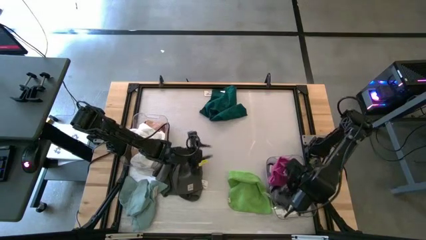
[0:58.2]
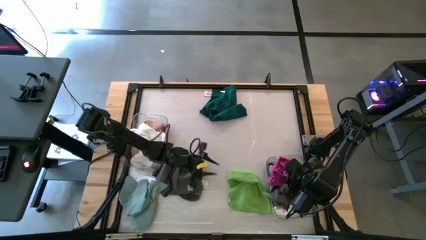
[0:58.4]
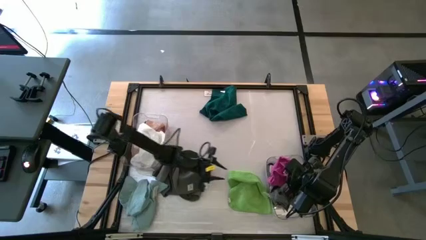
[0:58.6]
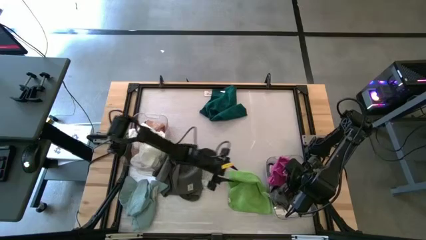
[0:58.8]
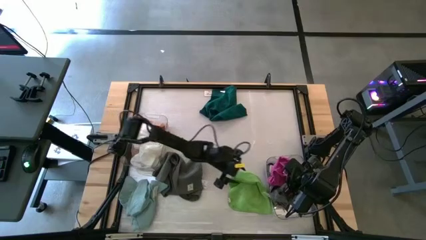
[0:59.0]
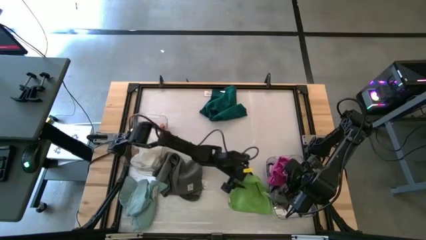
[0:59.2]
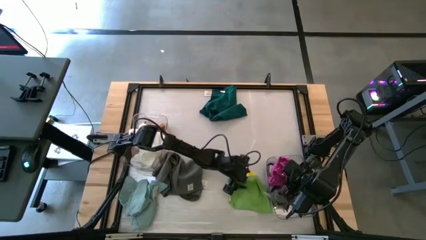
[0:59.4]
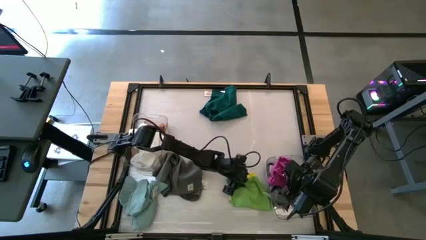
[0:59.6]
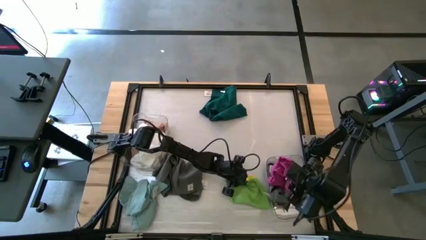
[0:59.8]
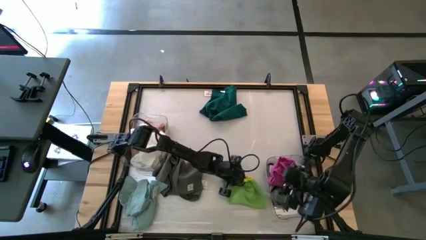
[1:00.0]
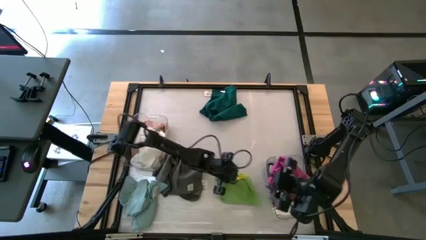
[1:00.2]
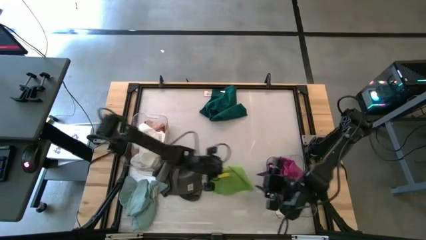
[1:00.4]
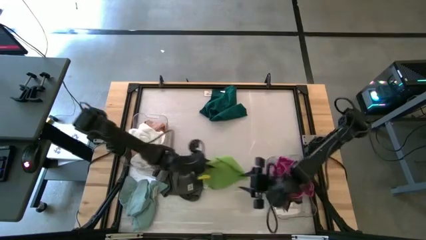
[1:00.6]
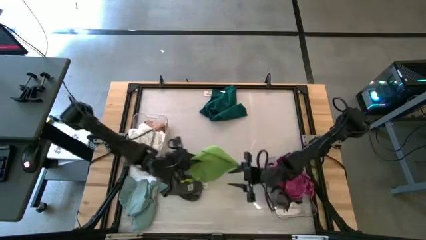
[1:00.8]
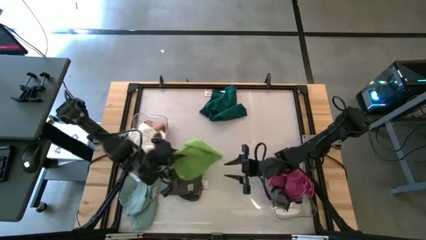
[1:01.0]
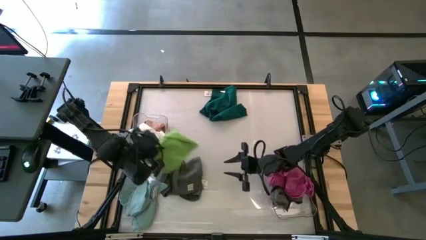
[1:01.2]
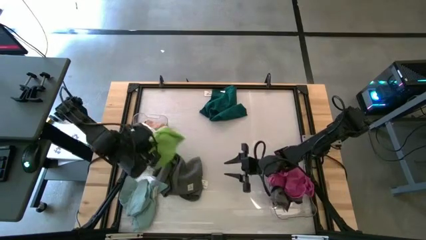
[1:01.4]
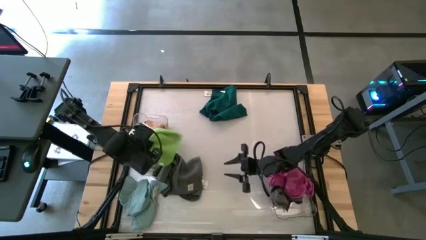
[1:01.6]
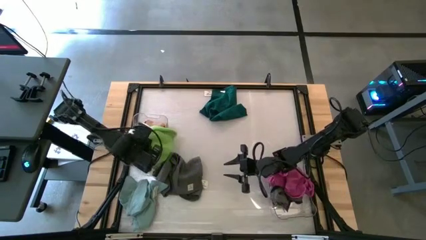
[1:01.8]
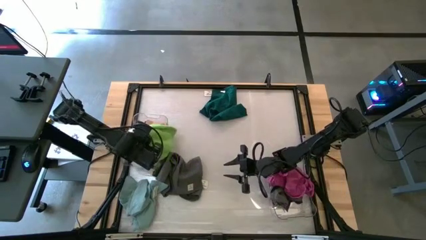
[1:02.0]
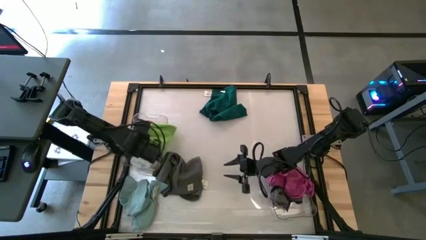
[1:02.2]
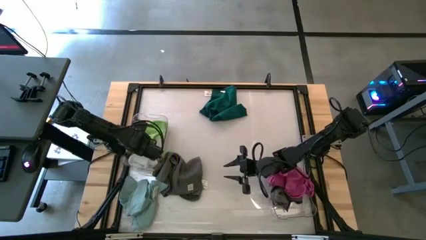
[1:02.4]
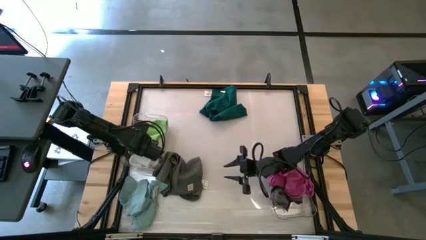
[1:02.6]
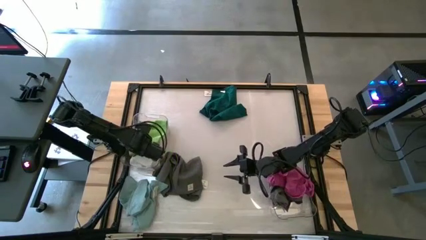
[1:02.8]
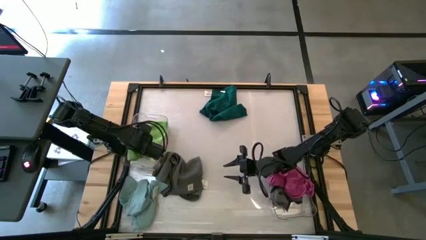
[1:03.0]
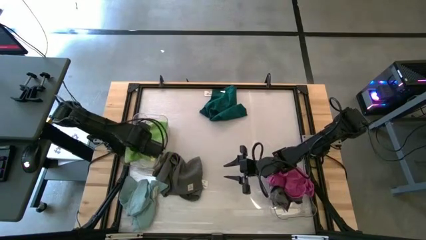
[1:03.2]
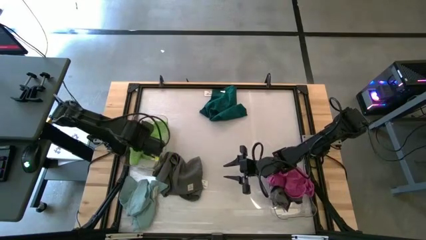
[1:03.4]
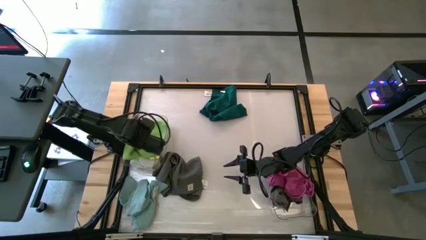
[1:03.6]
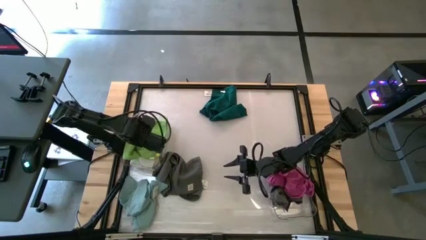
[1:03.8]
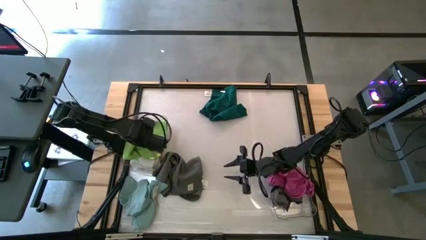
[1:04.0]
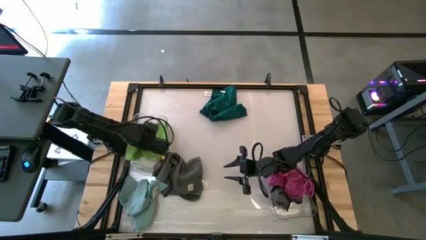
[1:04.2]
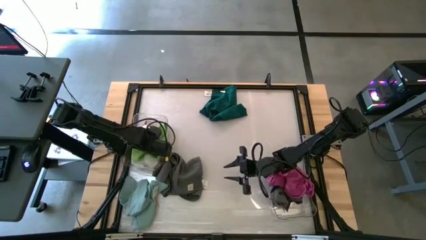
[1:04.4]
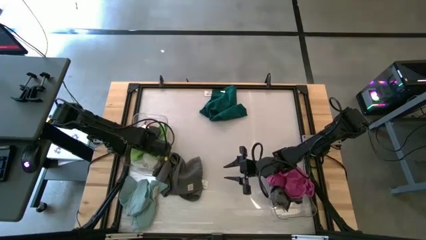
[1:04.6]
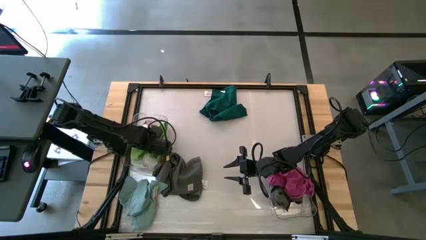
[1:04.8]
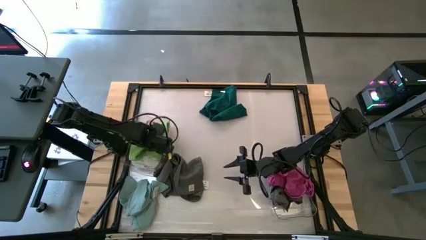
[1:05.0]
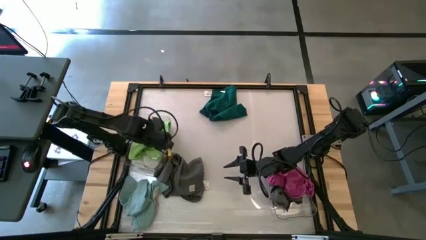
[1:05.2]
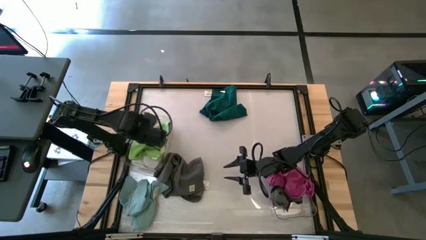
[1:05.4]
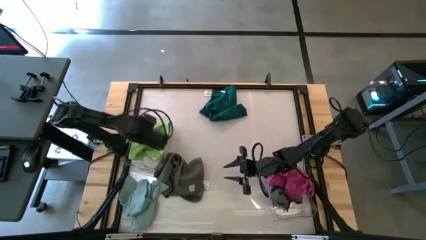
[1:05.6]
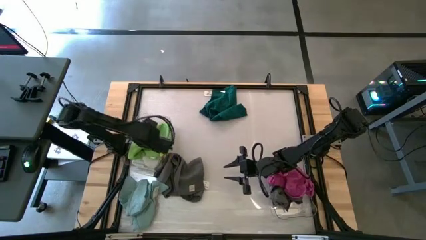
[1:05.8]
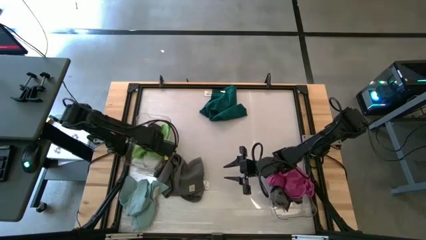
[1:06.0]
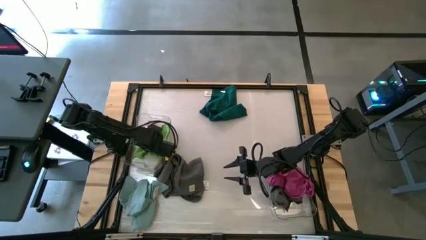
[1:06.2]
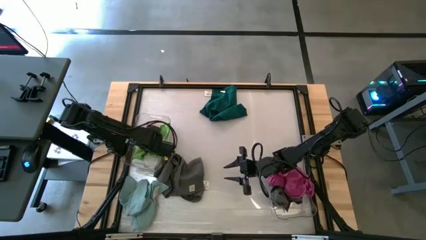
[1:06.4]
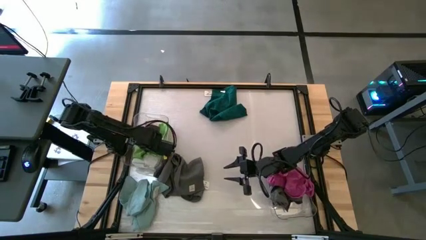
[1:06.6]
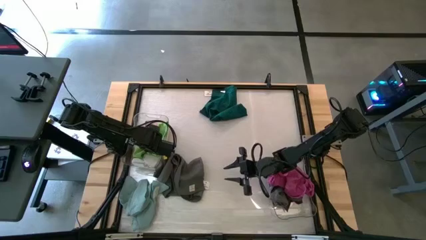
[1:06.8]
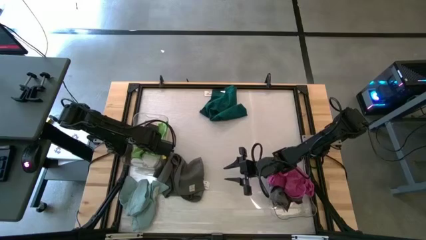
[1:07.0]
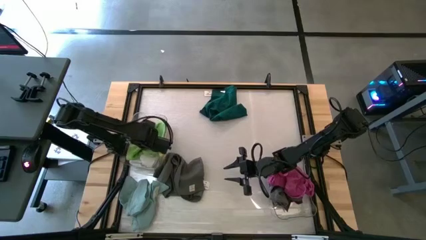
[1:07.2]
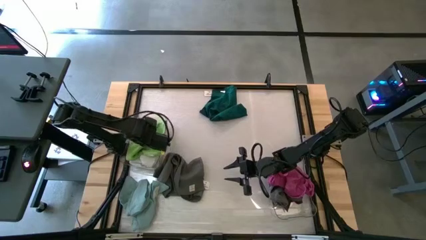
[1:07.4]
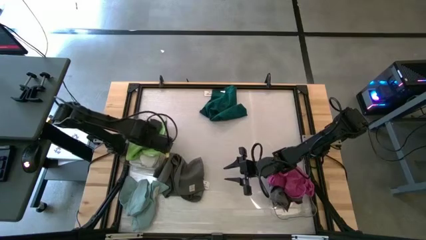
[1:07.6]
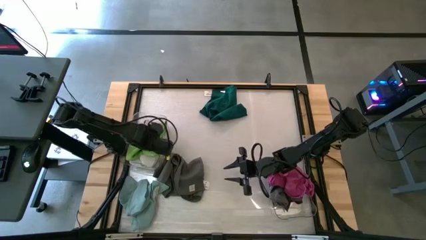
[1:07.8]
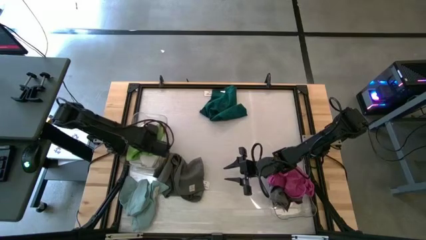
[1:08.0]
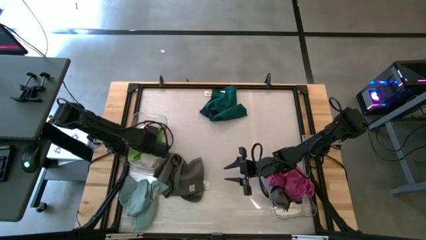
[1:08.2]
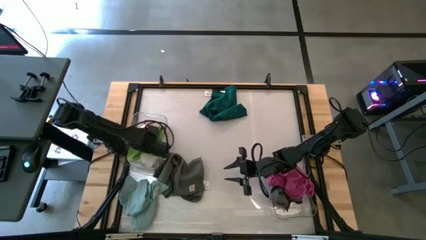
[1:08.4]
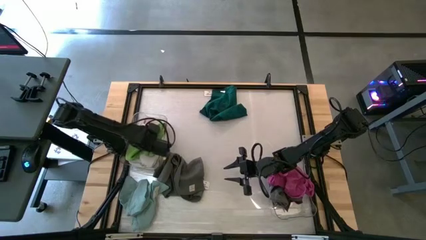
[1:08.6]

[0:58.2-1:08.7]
Task: Sort towels by color in basket
Put the green towel into the left transparent bin

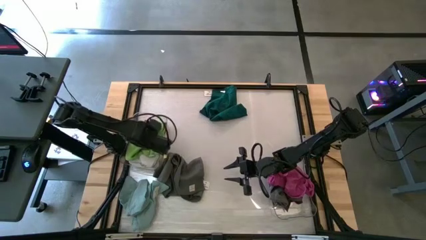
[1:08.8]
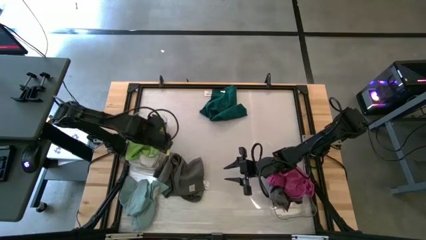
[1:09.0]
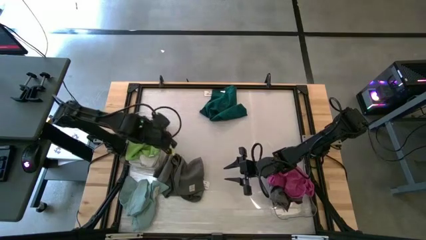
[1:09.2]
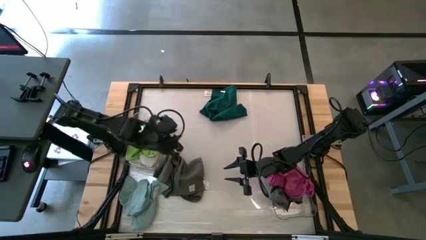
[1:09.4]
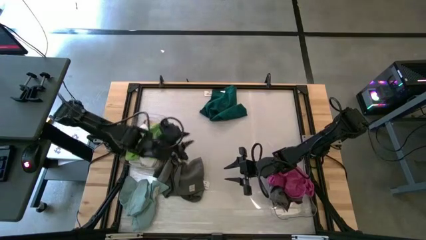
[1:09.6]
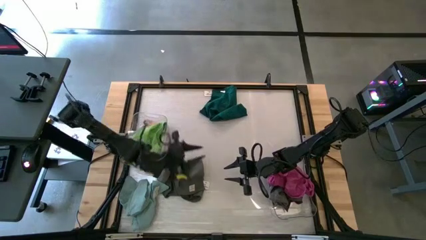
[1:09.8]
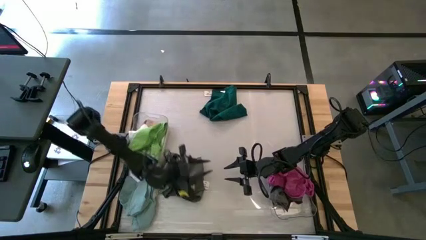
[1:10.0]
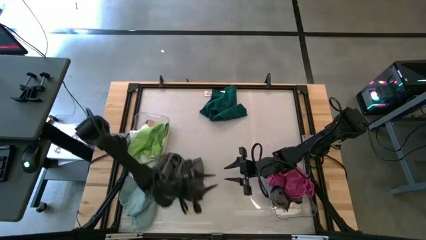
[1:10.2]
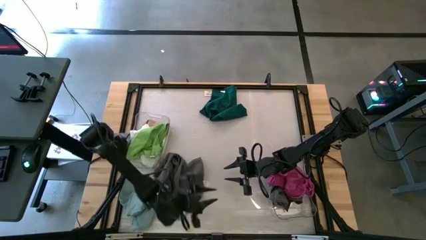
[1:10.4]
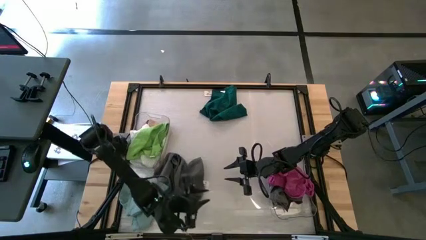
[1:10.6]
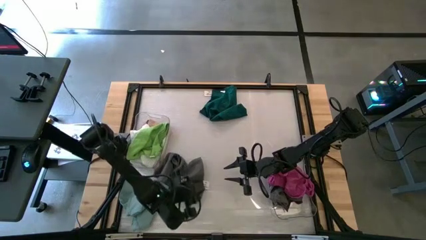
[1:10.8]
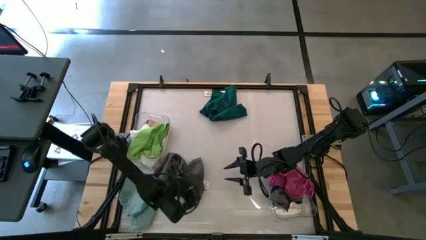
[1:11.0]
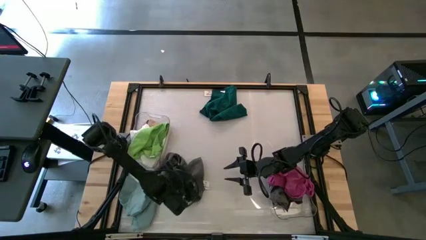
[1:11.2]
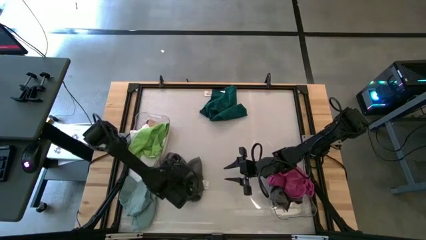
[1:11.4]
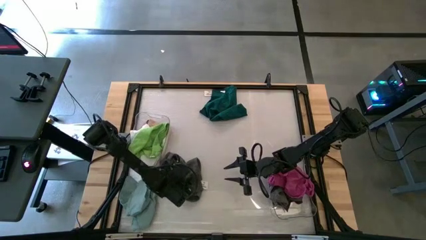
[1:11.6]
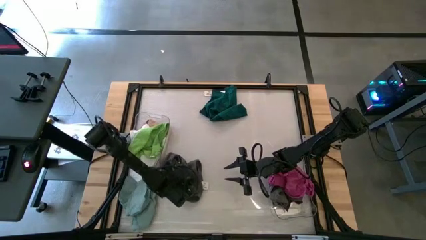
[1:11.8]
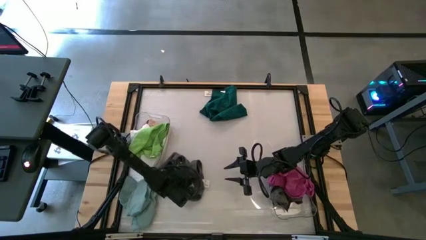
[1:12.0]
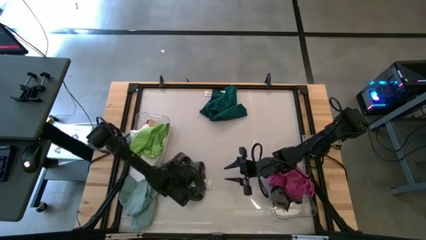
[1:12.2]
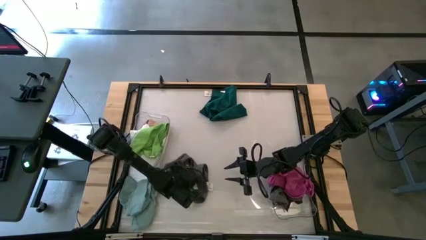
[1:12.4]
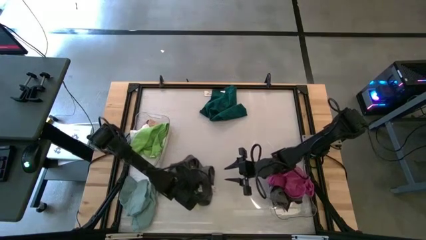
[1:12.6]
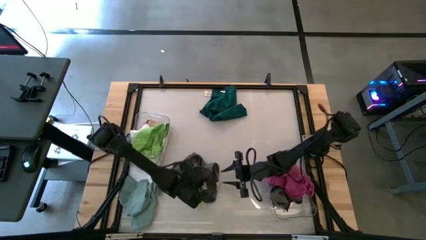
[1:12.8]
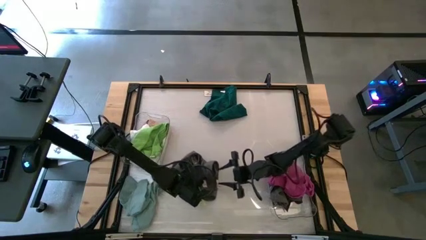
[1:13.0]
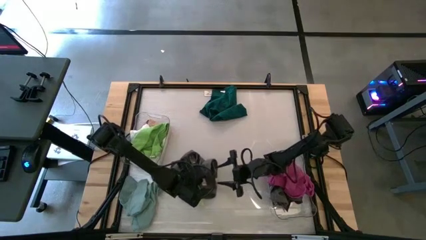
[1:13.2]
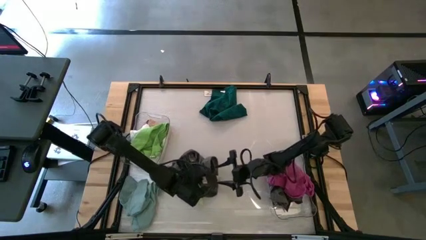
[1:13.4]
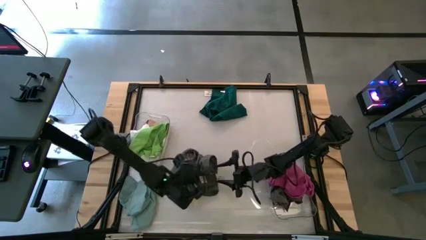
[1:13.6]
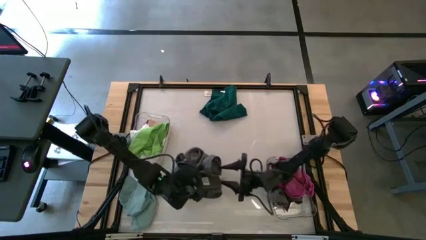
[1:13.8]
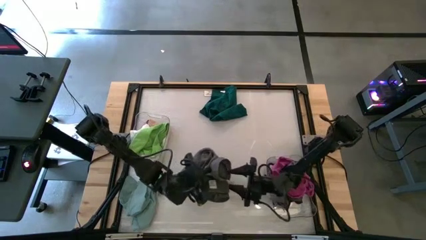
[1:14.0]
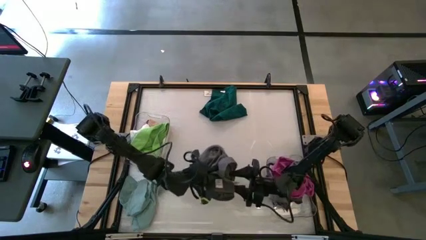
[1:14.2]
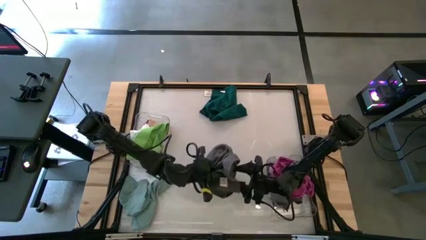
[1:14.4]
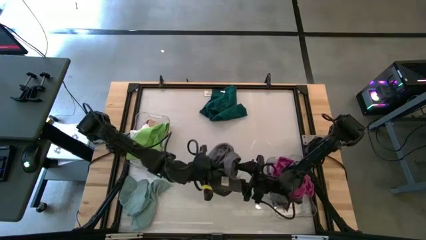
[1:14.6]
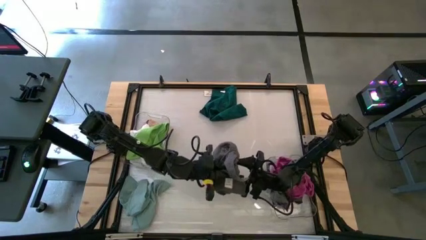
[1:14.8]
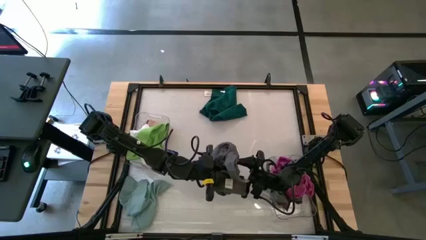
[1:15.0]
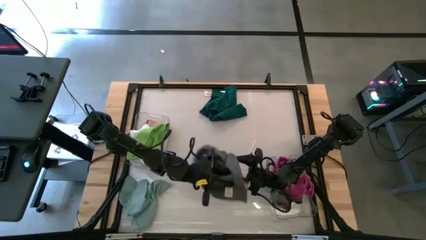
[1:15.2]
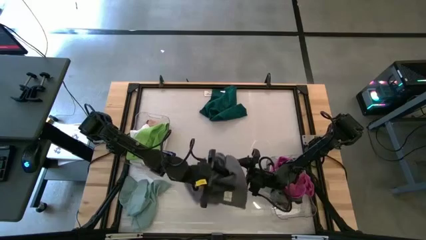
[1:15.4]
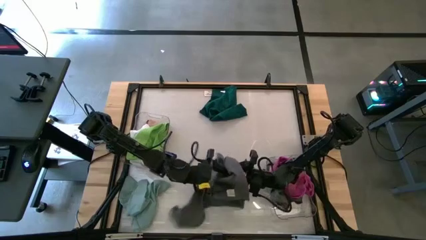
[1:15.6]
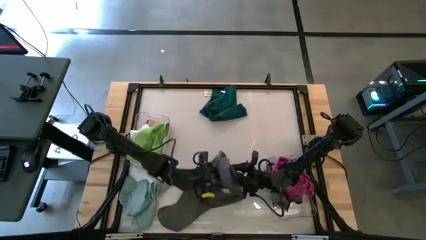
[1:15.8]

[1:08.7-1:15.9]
Put the gray towel into the right transparent bin
